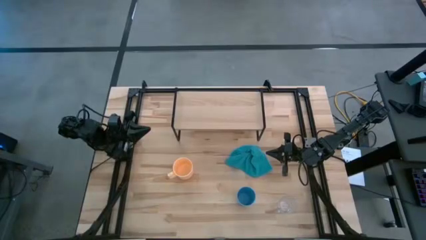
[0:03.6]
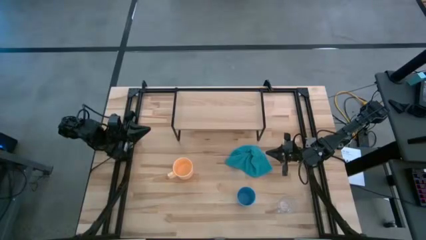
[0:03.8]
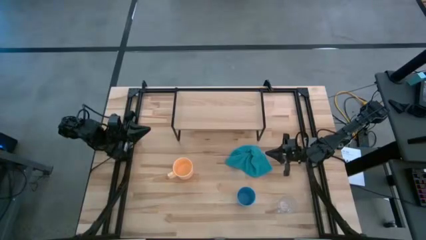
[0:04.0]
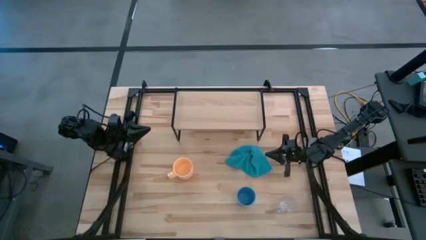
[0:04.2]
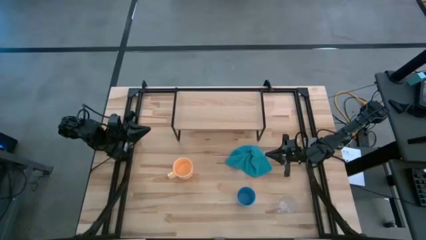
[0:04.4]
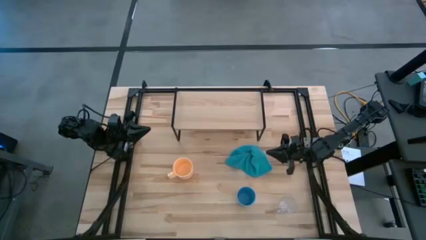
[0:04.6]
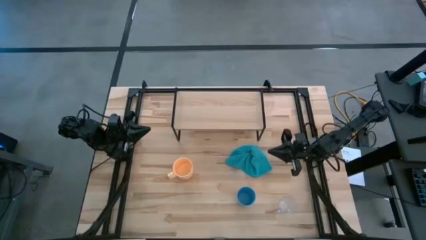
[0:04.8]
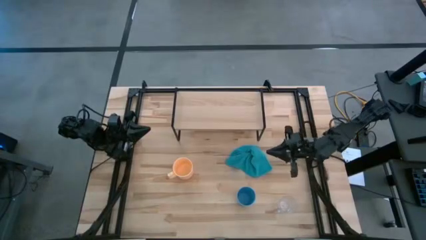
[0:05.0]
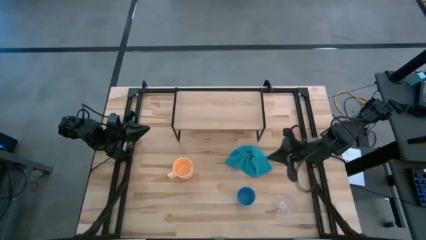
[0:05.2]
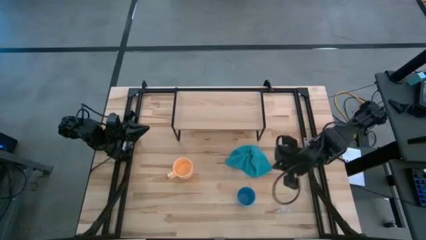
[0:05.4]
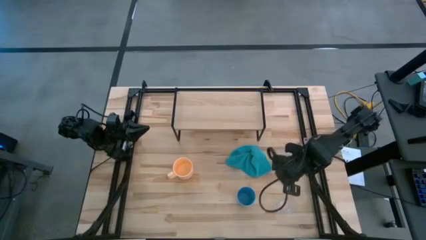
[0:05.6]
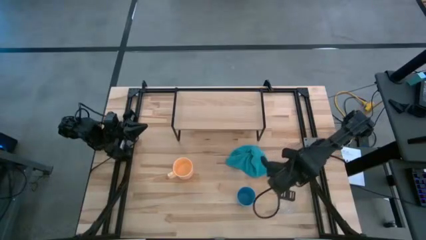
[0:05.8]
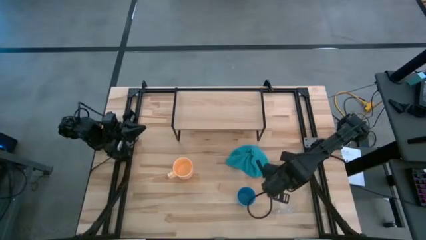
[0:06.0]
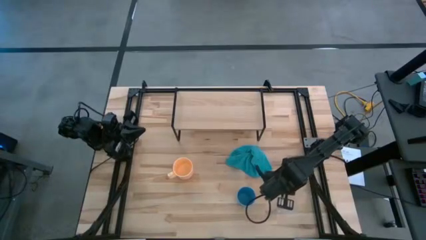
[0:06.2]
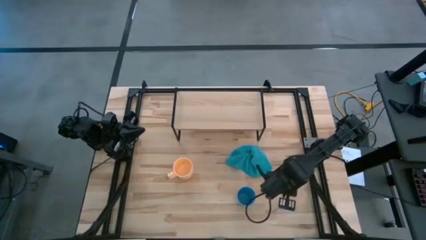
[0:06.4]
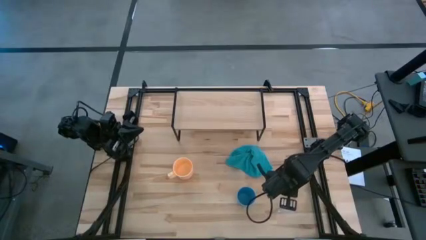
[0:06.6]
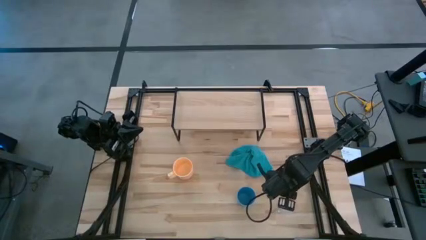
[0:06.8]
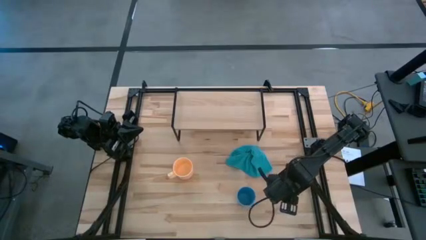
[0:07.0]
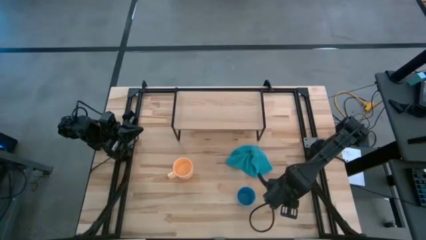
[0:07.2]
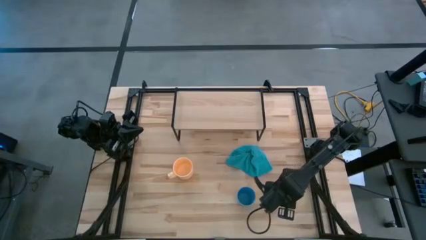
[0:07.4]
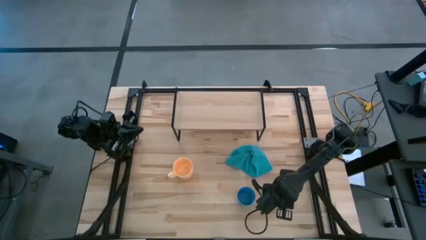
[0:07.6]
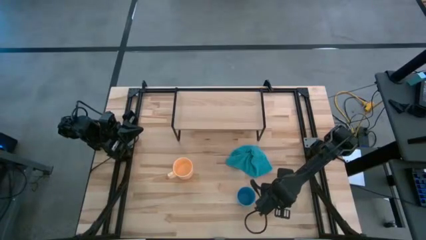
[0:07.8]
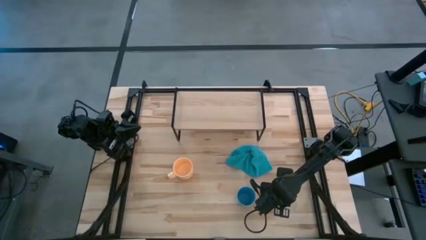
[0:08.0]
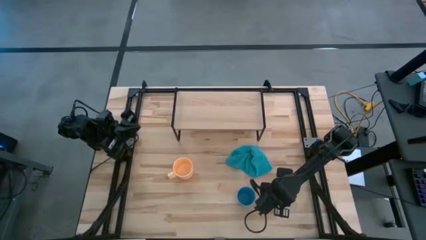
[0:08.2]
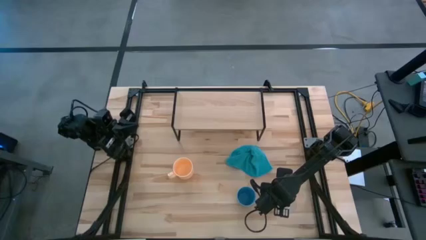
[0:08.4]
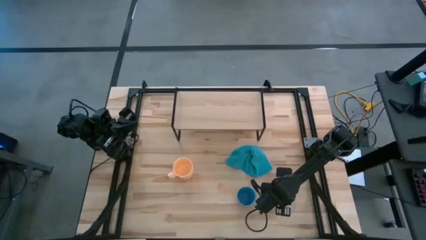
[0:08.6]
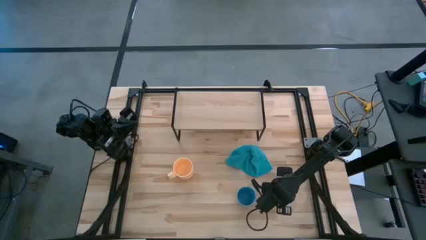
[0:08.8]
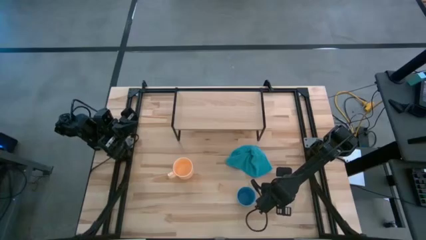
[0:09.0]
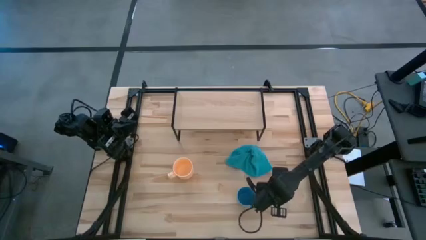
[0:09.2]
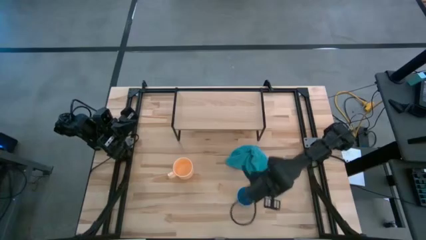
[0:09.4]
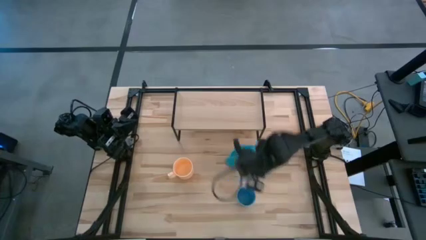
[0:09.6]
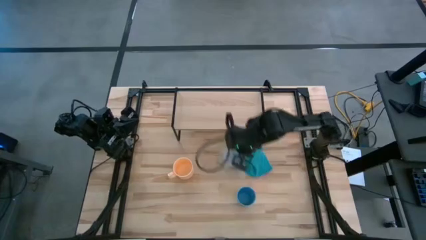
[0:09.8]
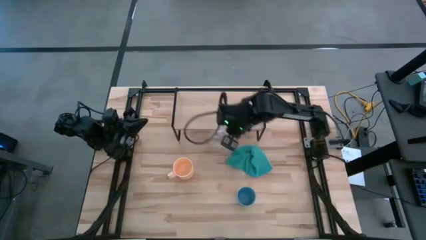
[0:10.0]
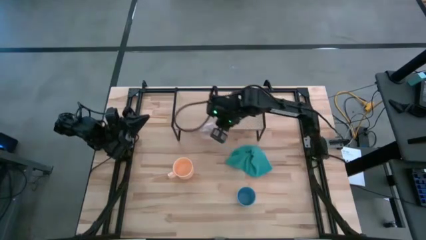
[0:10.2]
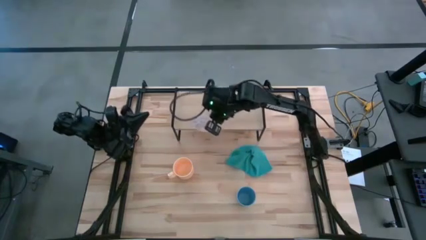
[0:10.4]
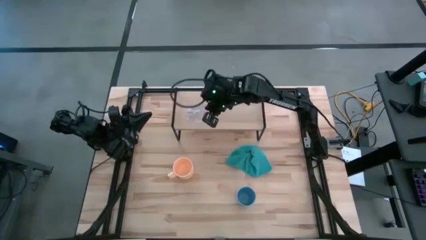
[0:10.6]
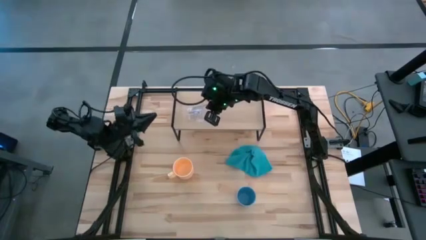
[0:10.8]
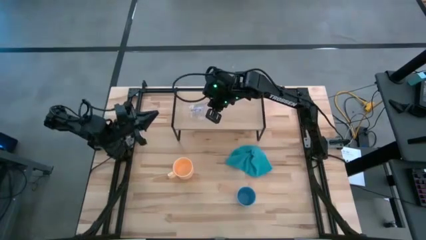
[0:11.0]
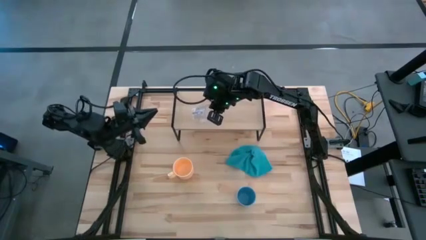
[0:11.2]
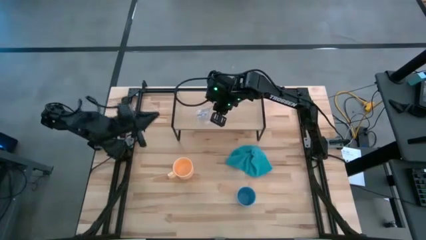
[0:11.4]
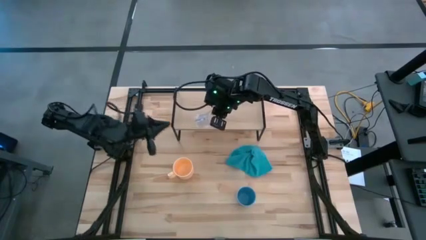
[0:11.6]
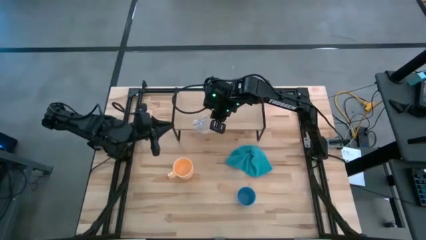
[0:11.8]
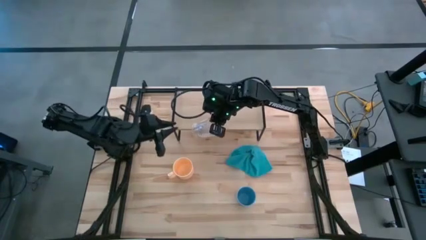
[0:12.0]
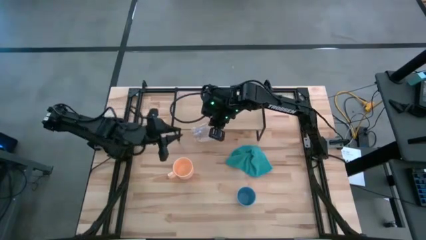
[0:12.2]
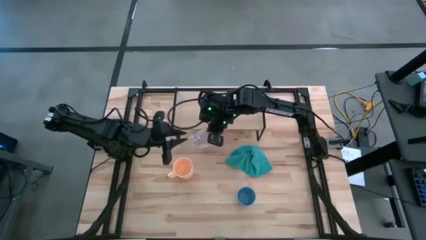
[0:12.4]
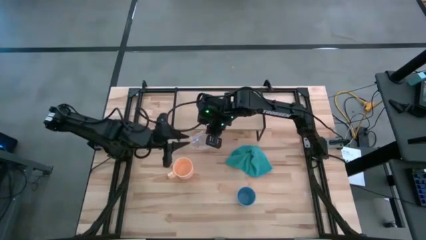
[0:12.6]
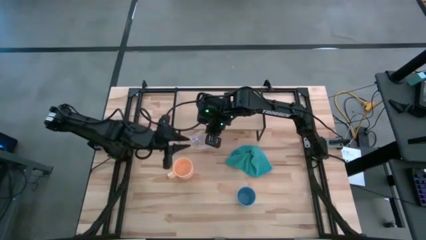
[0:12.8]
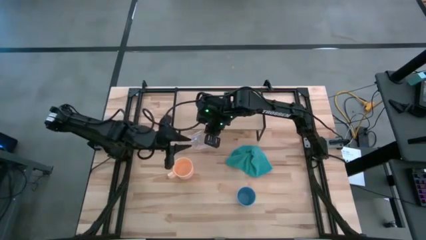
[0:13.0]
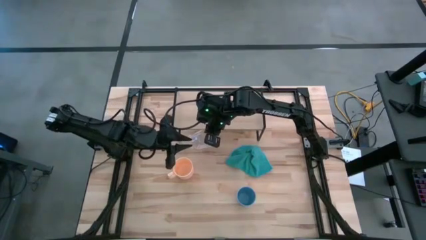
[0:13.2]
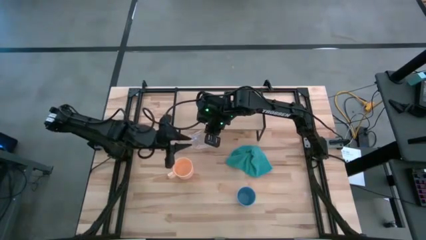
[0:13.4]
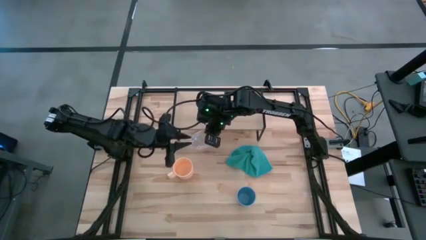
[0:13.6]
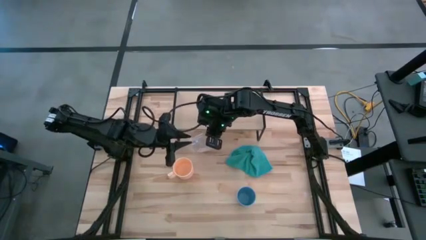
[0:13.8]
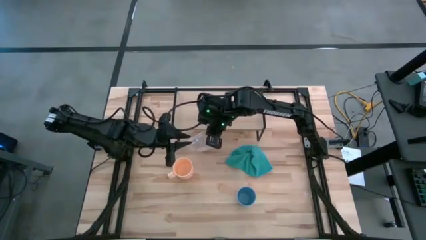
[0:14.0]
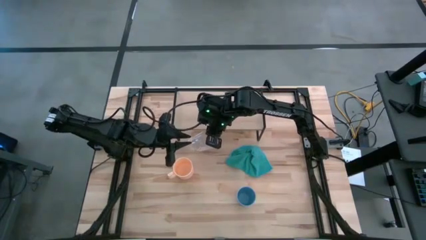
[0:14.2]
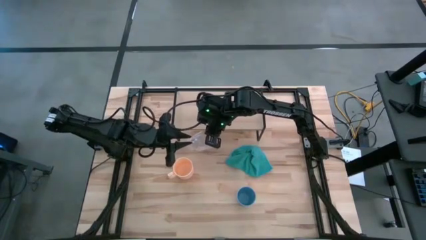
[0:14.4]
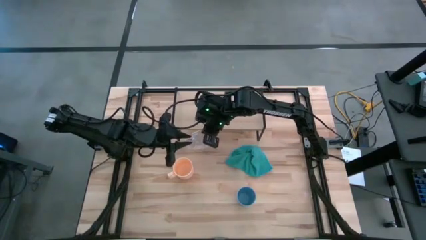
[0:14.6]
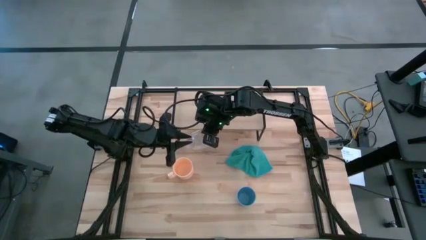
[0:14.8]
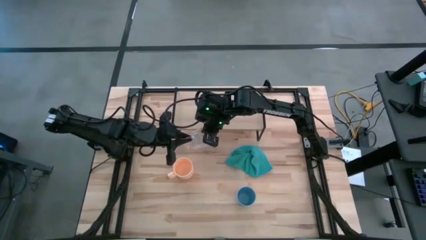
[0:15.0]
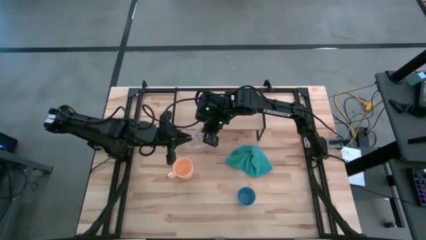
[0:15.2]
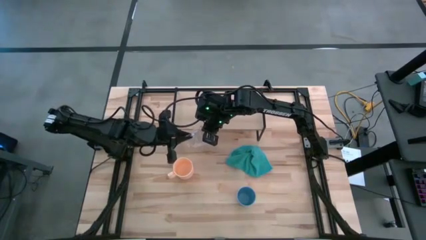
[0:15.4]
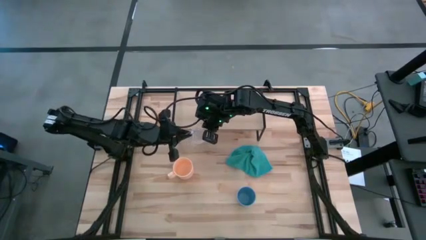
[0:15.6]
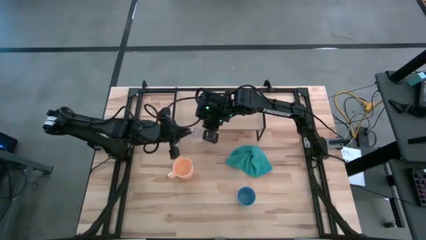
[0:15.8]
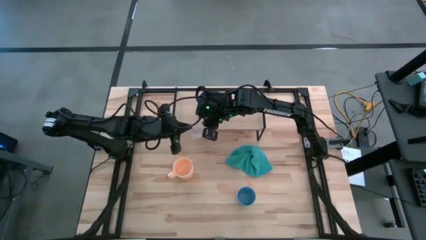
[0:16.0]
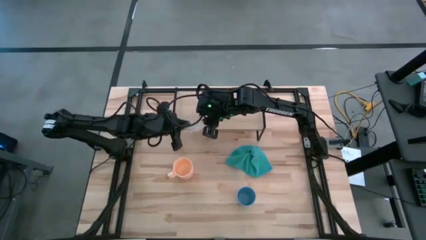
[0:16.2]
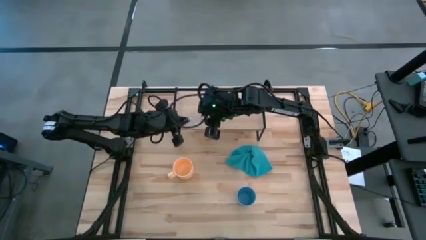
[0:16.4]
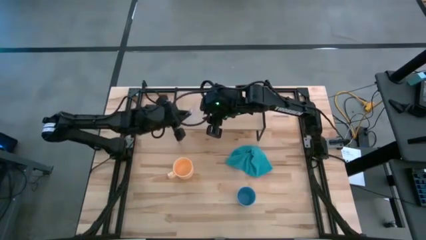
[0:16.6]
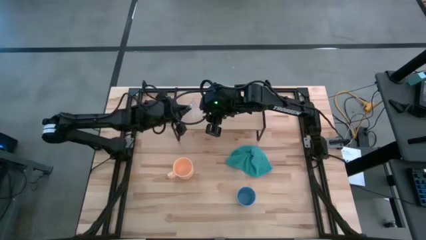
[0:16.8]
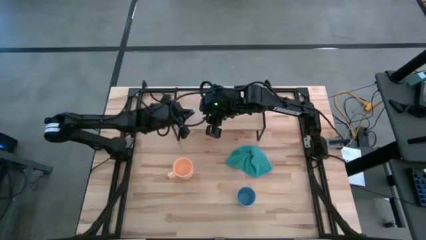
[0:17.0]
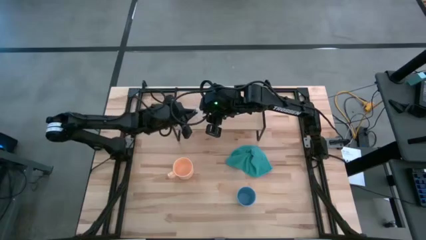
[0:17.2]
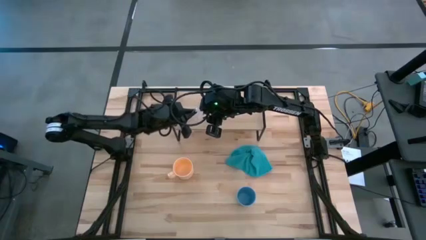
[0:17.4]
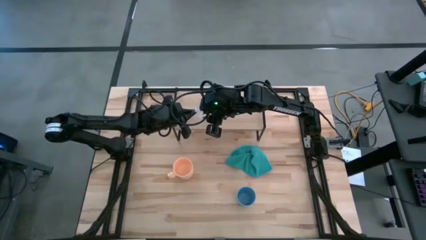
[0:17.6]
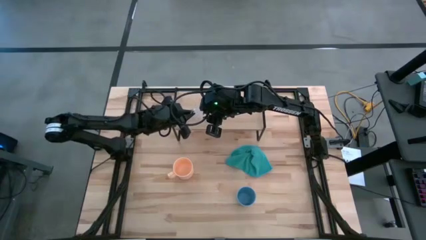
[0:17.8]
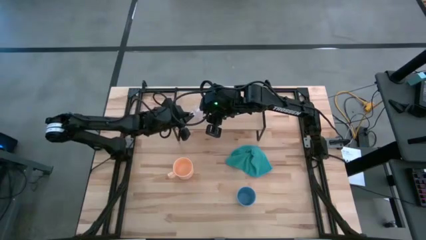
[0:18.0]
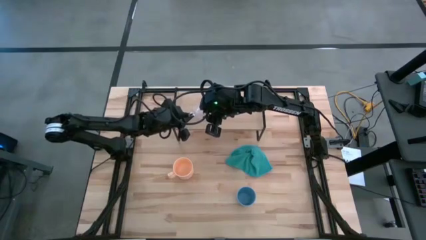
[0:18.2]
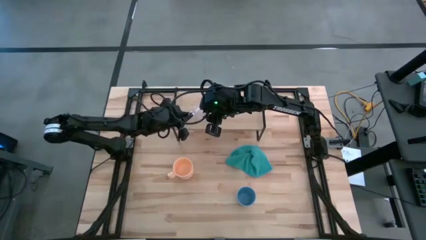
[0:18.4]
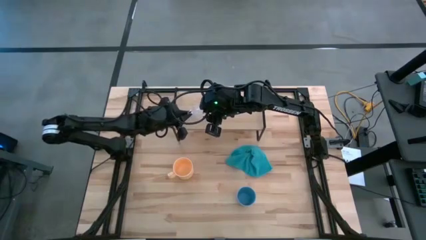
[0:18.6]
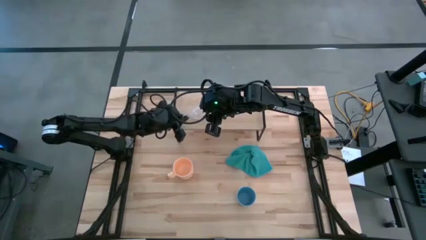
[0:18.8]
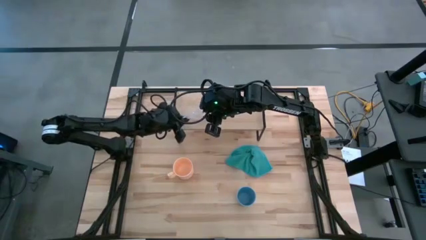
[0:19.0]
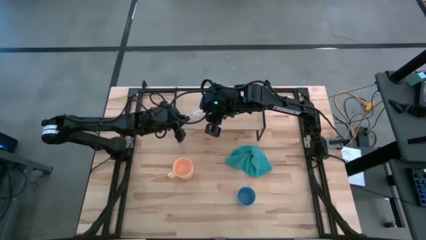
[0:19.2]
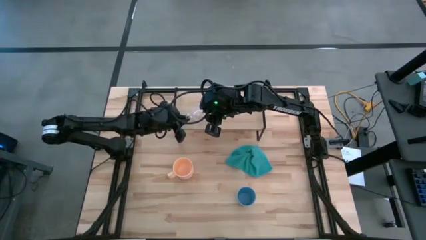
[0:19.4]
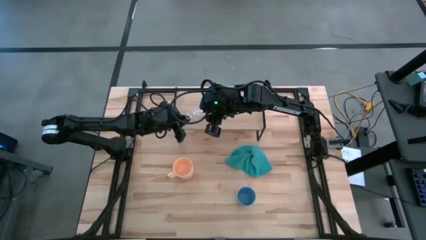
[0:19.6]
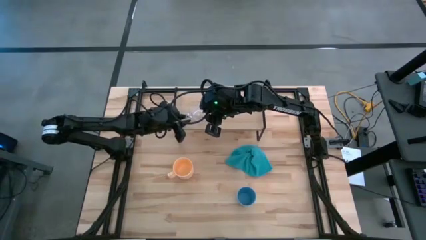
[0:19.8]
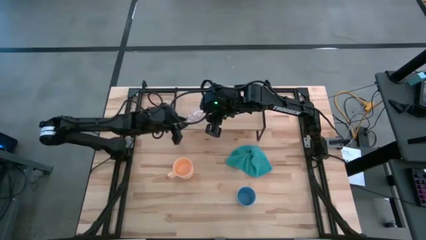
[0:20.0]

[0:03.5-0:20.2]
Task: Stack small to large cups/mugs on shelf
Put the transparent mug on the shelf
